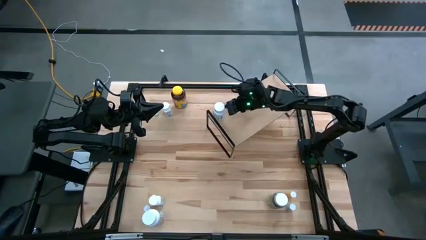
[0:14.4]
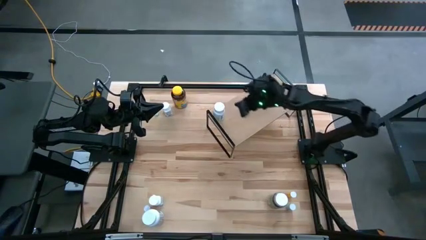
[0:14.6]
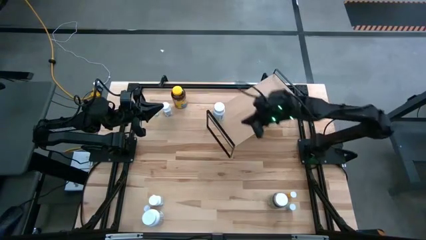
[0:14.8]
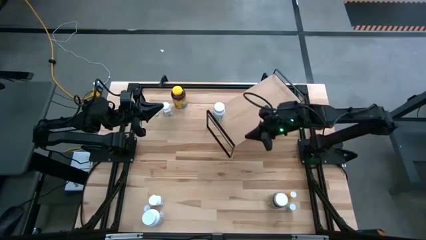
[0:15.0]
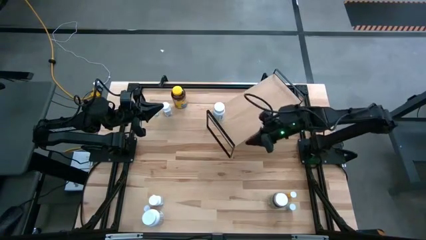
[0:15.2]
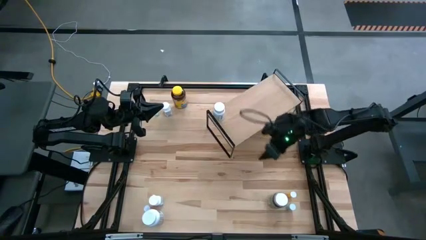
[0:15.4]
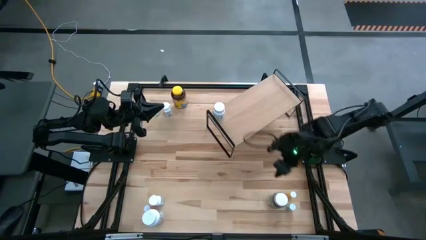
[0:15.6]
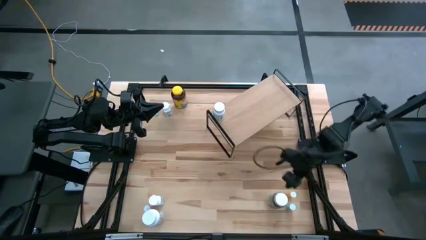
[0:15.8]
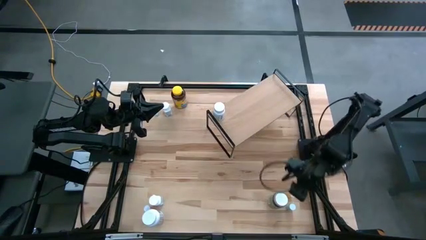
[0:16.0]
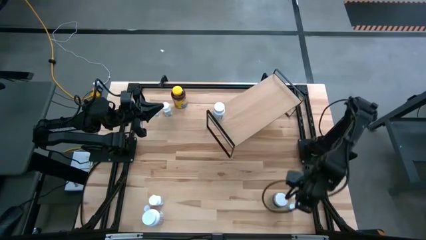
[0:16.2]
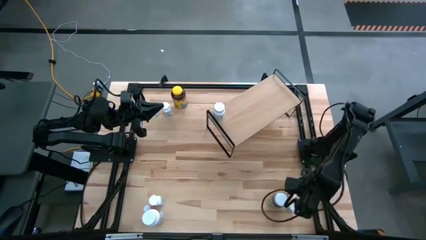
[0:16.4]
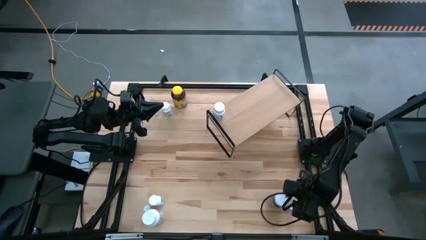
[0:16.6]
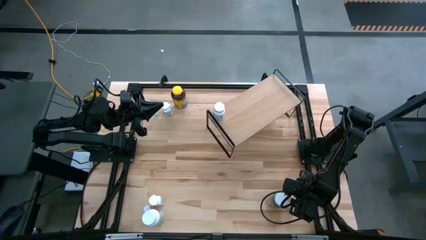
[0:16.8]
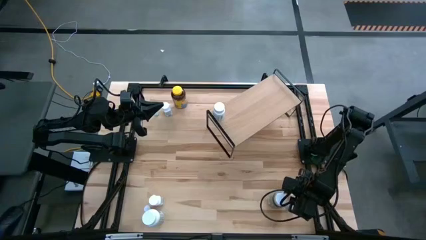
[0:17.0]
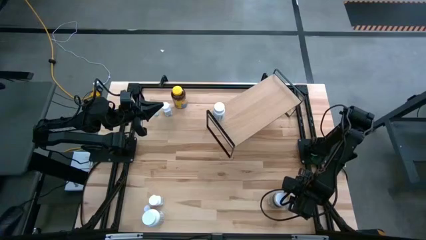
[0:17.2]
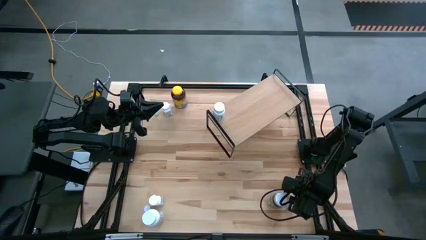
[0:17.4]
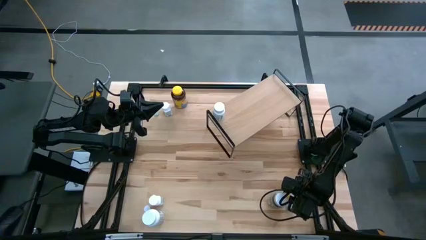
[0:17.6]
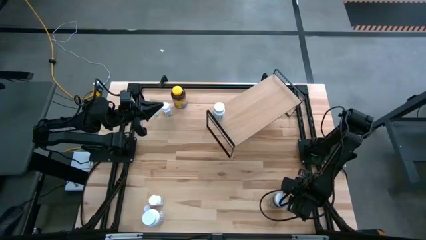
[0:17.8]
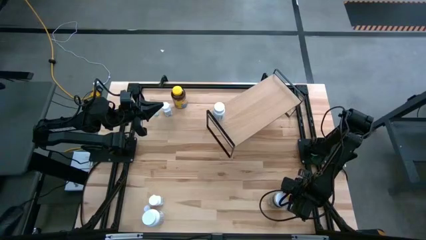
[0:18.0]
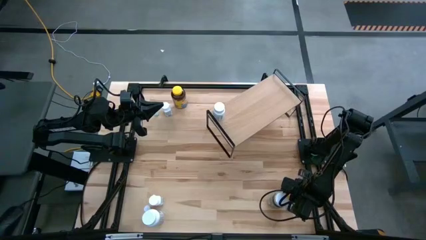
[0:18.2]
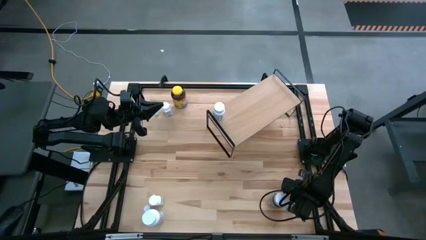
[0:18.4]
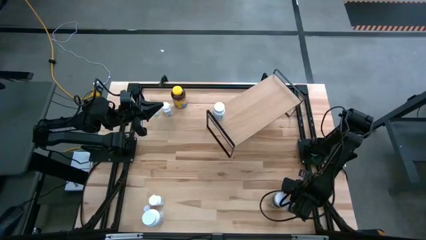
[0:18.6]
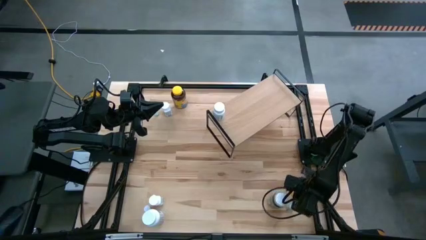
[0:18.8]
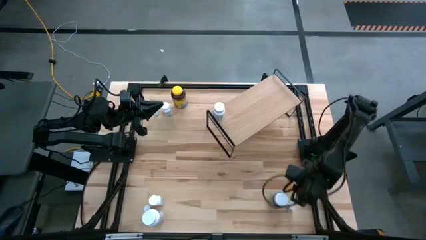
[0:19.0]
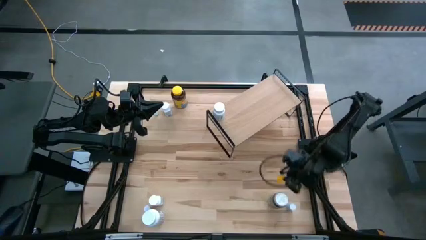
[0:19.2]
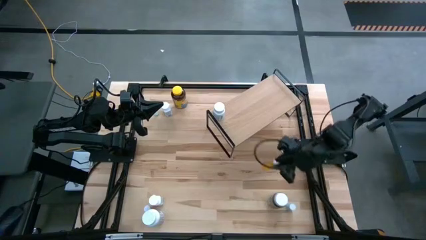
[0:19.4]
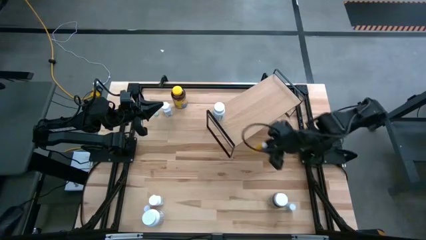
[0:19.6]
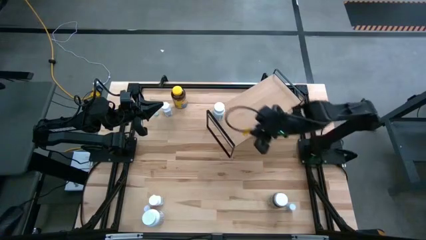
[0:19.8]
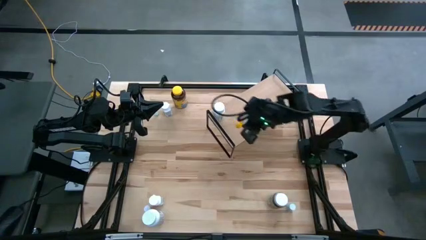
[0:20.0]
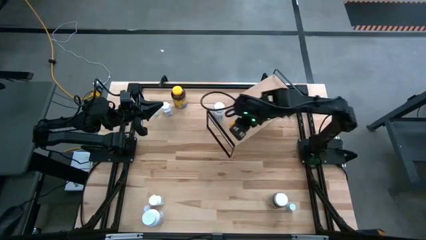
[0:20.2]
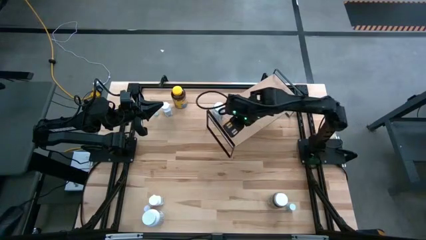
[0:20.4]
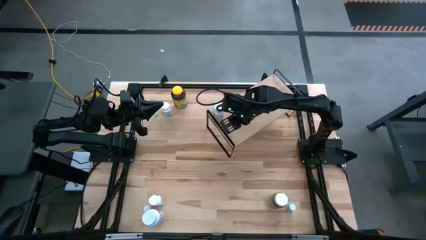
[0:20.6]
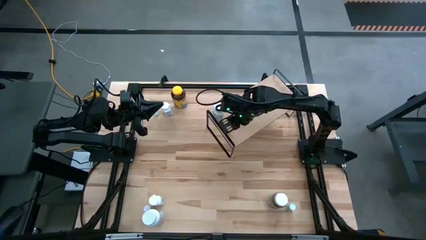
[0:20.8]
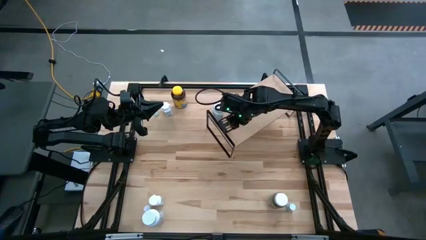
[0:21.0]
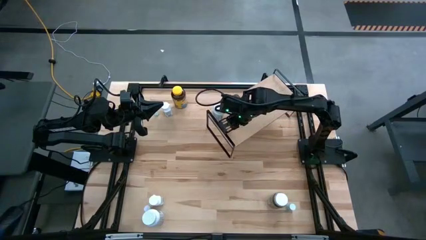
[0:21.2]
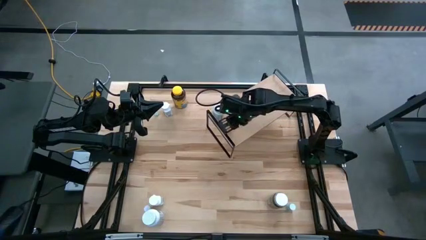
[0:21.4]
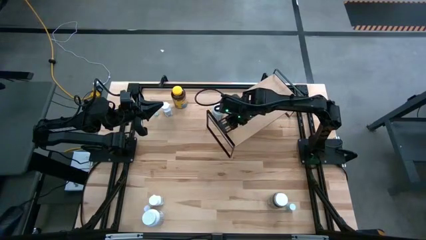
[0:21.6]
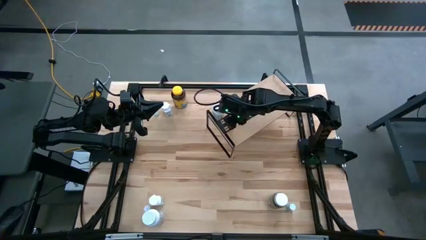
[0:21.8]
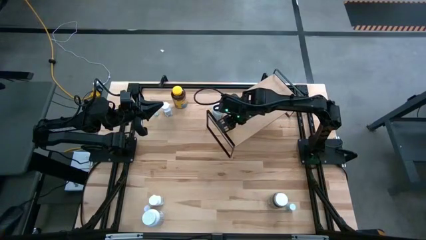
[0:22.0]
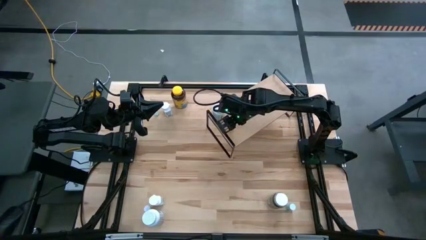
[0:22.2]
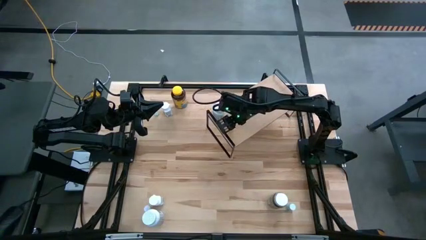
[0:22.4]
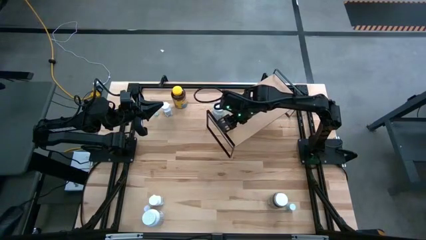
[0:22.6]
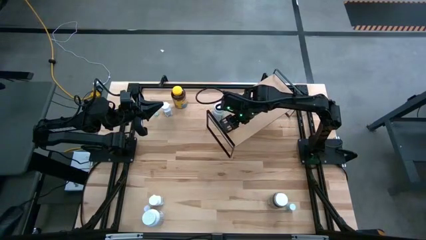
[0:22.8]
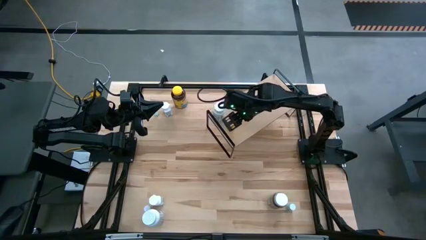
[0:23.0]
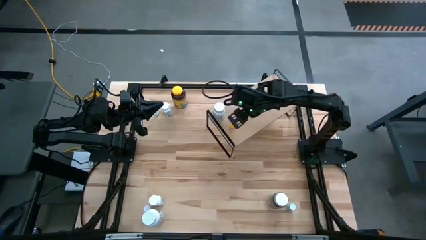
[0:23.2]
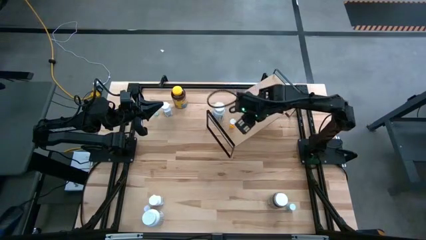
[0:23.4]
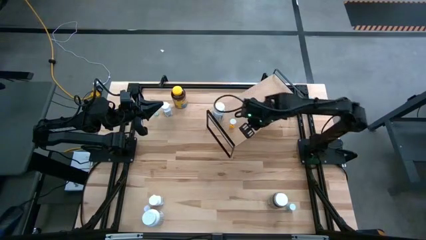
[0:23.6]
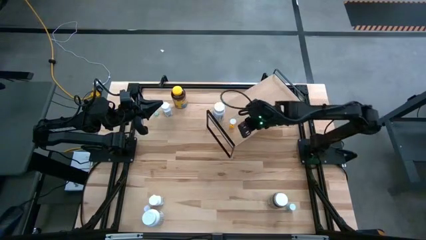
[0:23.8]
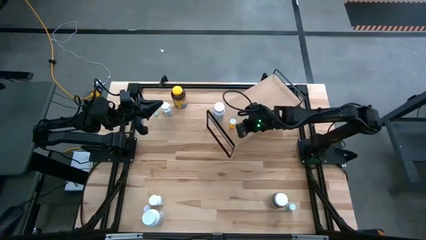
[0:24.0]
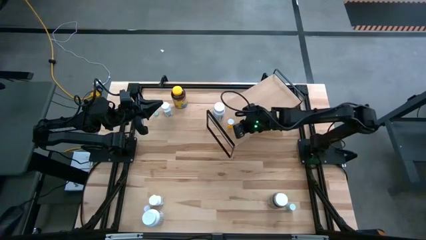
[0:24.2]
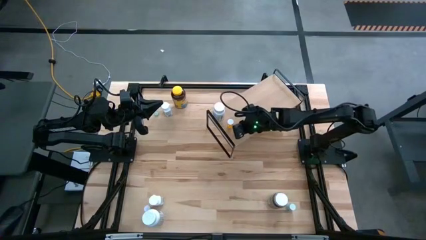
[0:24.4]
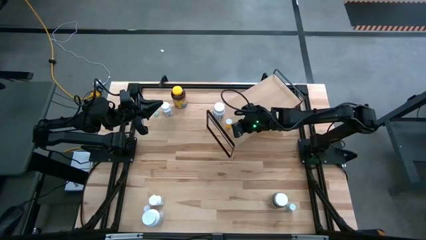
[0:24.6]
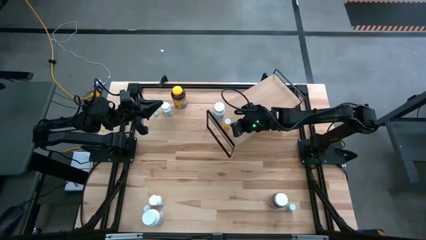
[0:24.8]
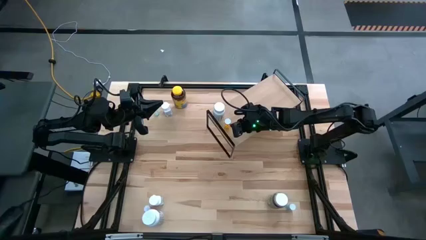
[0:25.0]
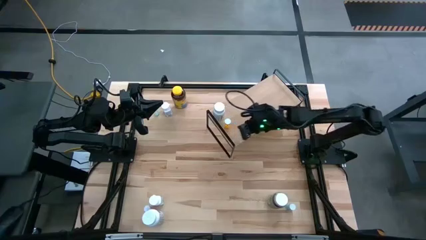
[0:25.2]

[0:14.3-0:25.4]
Task: Pick and place medicine bottles onto shelf by color
Put the orange pill bottle on the shelf

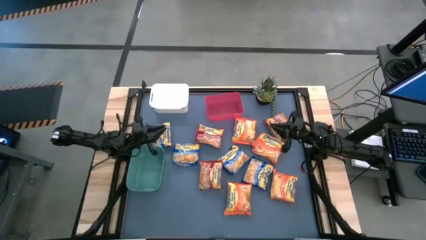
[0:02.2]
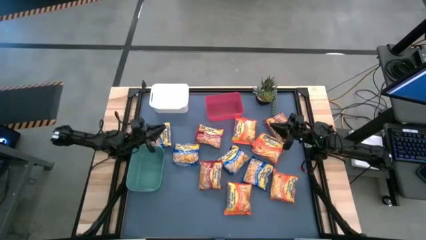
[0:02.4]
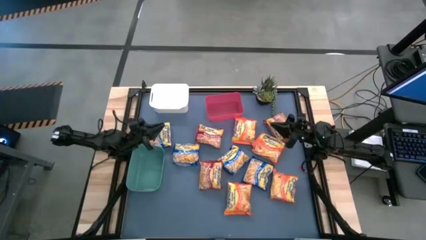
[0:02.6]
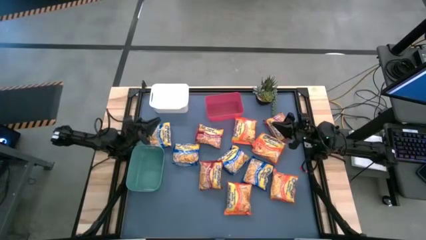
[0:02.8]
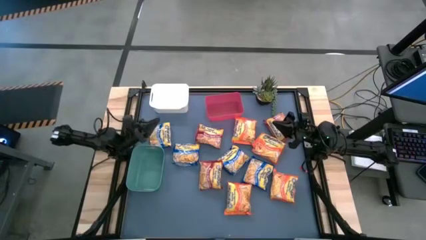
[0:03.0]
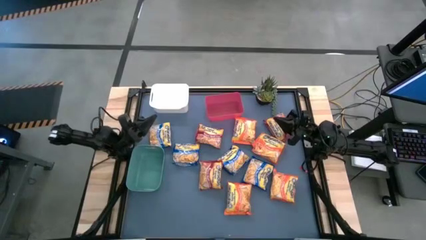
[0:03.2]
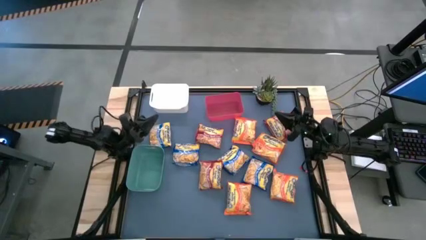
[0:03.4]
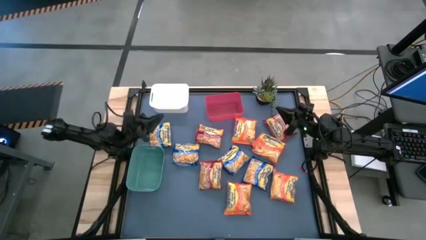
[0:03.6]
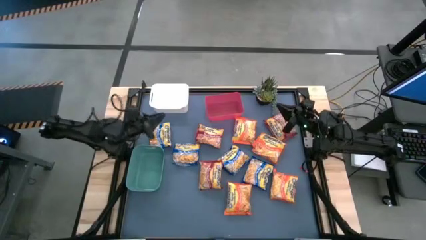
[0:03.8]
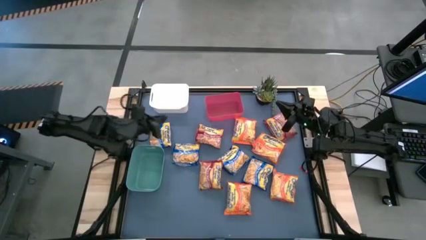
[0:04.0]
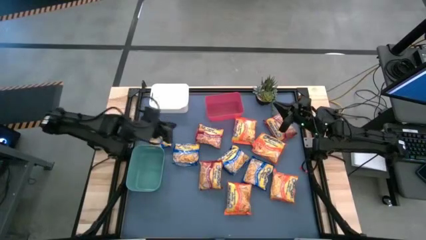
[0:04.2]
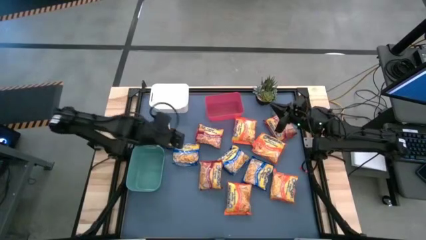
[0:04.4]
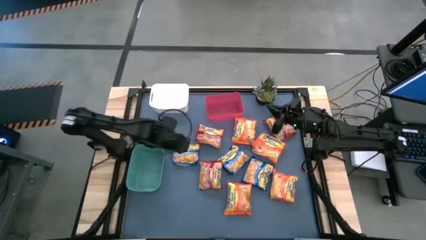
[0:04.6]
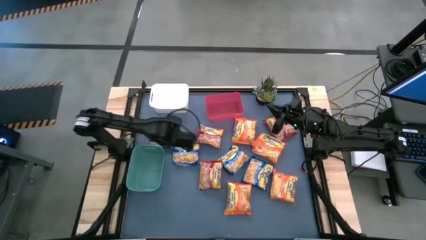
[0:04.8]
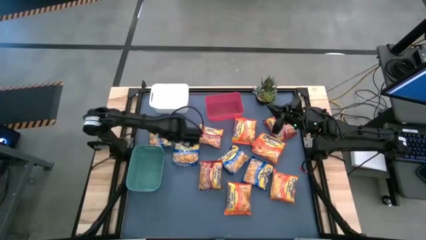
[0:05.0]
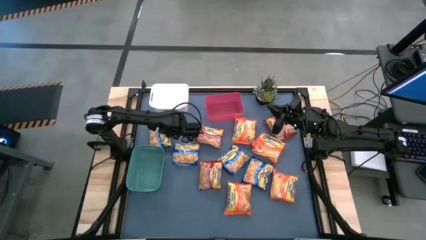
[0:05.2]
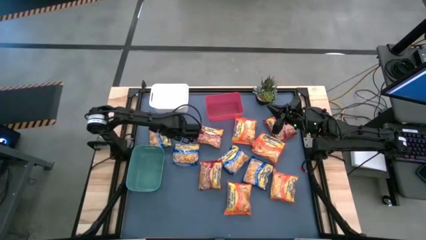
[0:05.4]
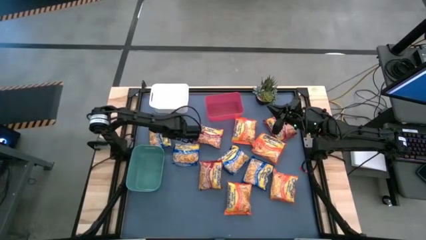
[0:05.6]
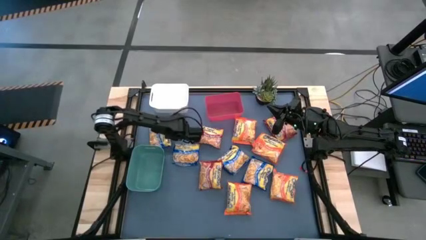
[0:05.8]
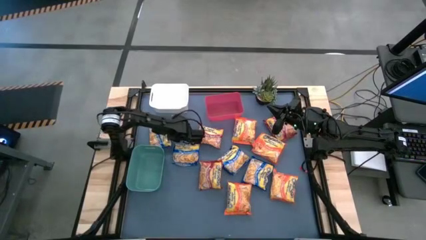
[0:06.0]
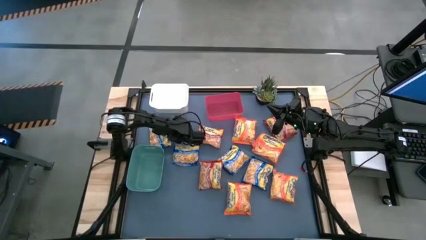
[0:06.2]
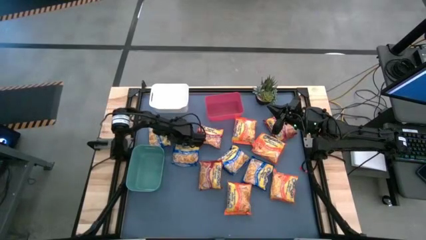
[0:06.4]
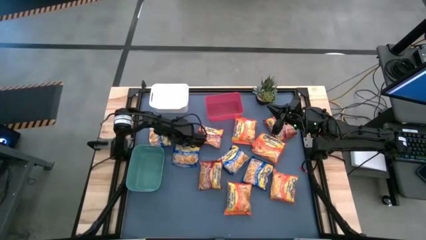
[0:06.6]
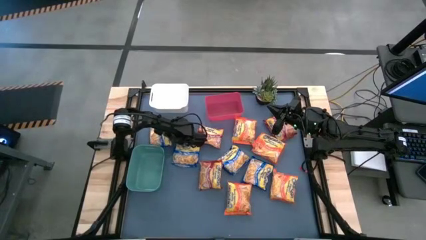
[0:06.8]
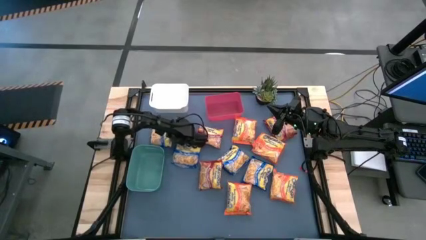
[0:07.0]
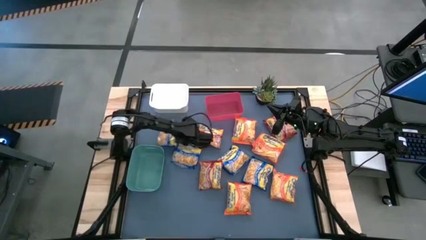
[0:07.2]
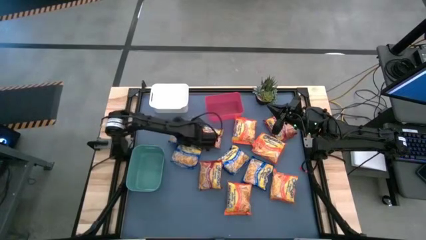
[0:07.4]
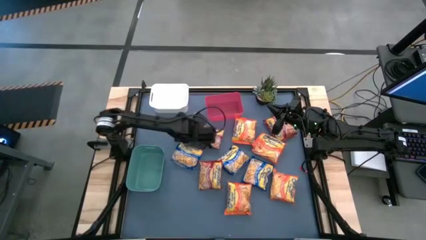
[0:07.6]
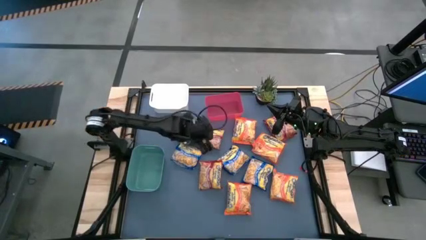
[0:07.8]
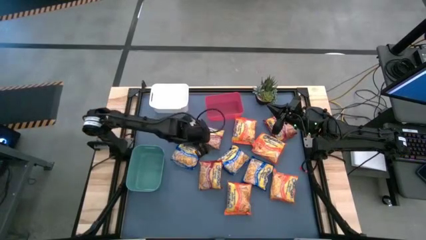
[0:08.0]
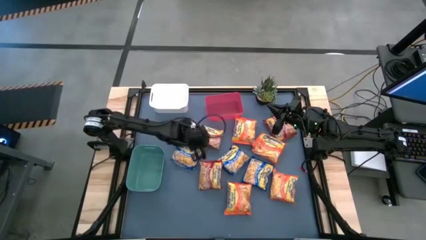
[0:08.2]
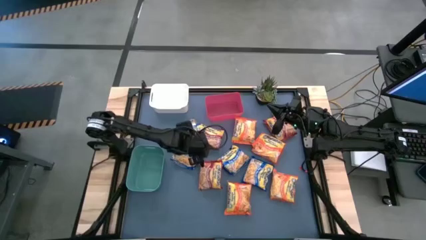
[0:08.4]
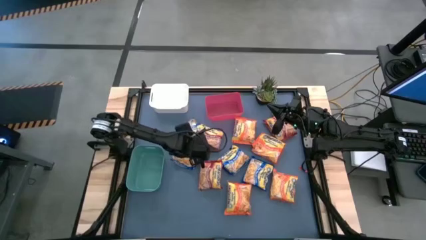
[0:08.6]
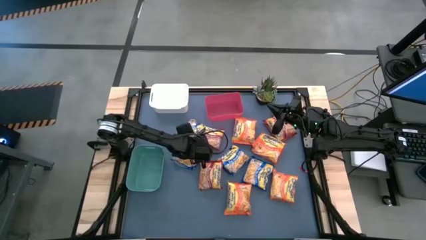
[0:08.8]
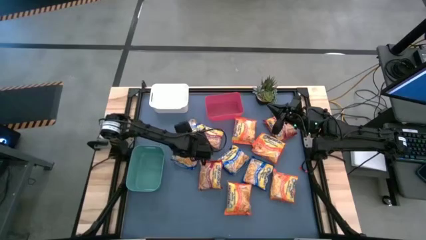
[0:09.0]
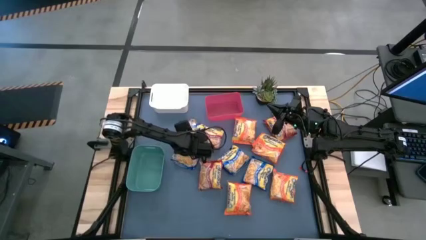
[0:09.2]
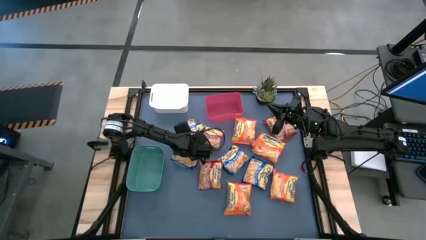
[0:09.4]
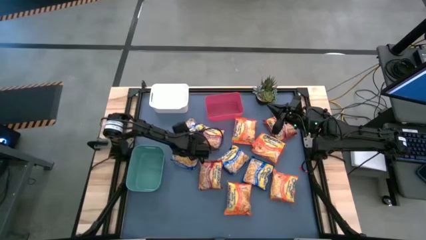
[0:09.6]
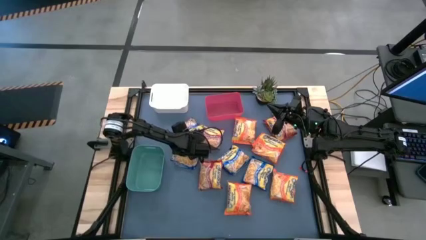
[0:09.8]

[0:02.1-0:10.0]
Task: Sort Maruchan noodles
Put the blue noodle pack into the green bin
